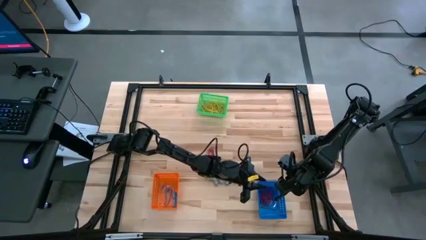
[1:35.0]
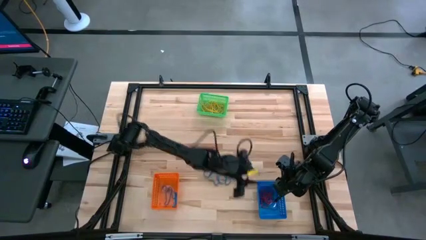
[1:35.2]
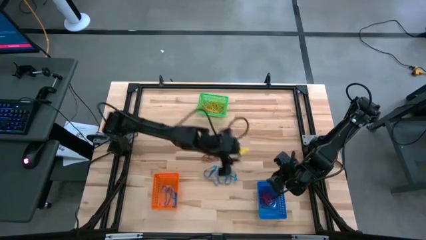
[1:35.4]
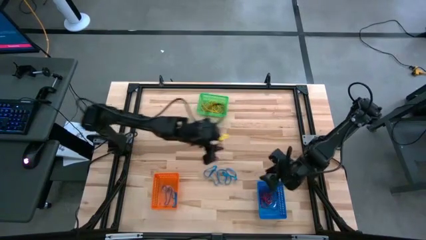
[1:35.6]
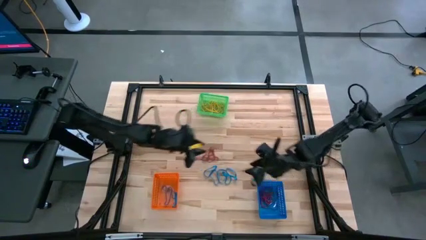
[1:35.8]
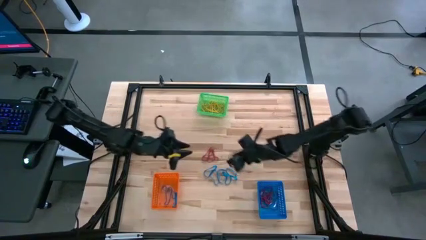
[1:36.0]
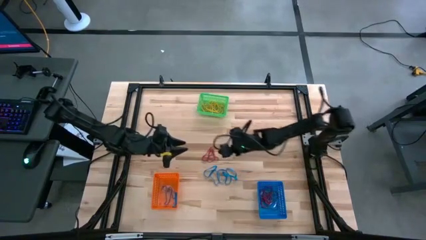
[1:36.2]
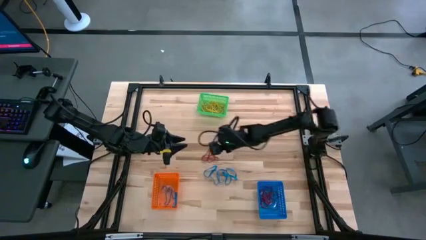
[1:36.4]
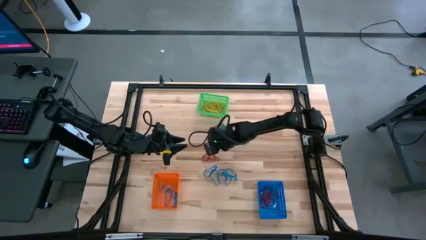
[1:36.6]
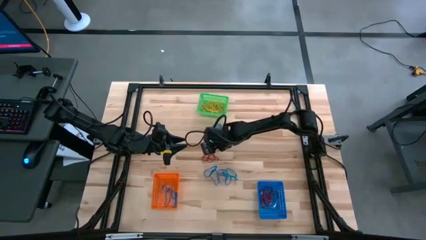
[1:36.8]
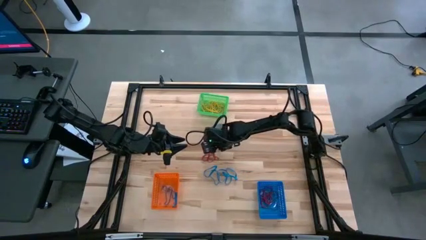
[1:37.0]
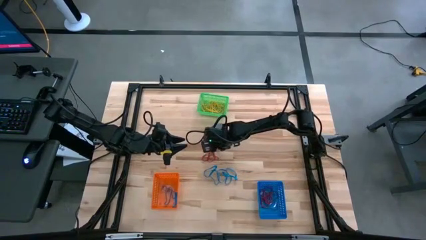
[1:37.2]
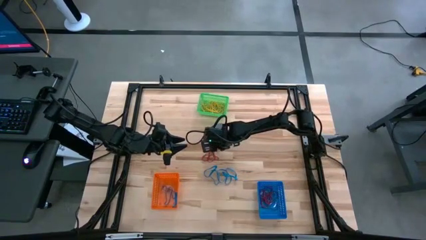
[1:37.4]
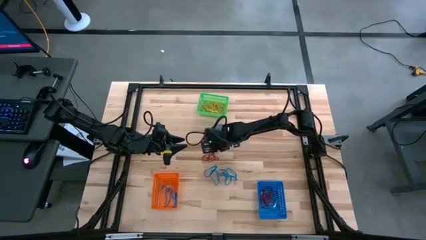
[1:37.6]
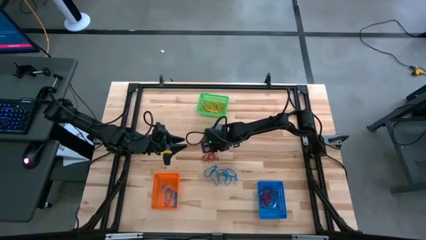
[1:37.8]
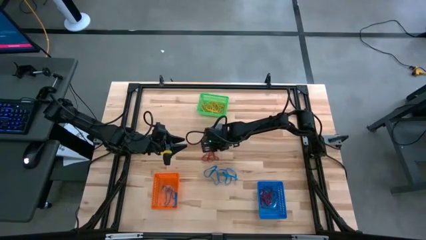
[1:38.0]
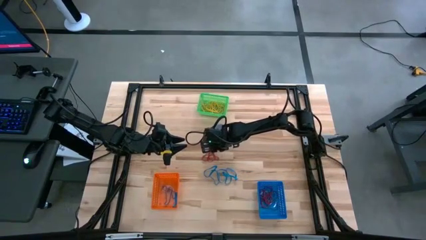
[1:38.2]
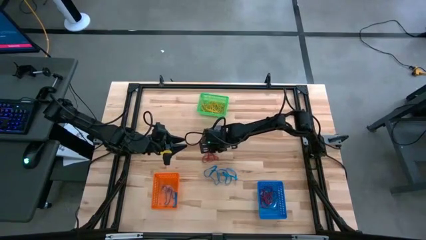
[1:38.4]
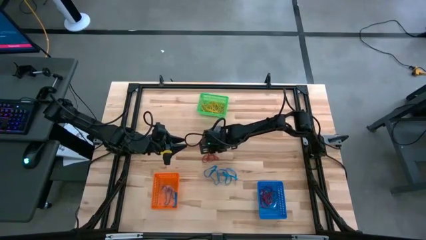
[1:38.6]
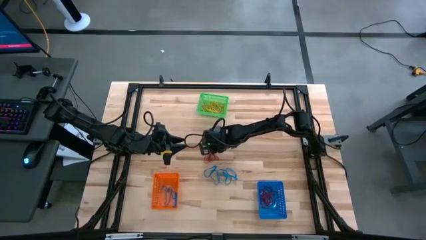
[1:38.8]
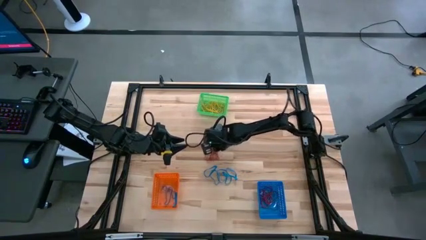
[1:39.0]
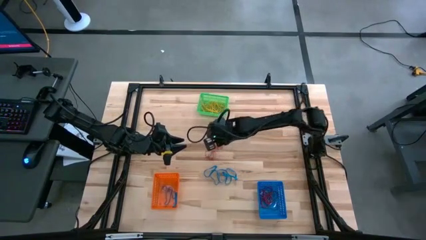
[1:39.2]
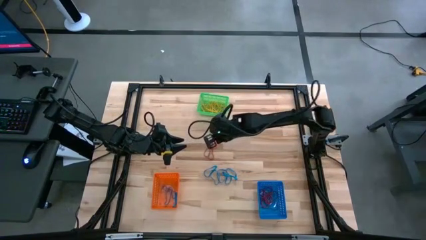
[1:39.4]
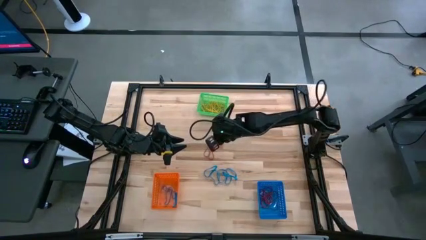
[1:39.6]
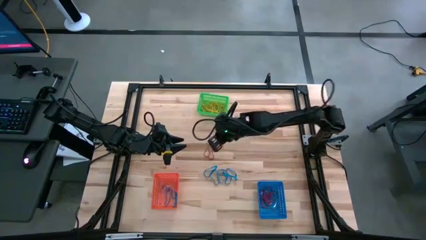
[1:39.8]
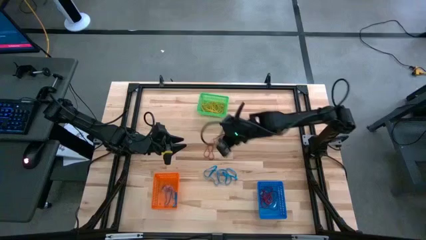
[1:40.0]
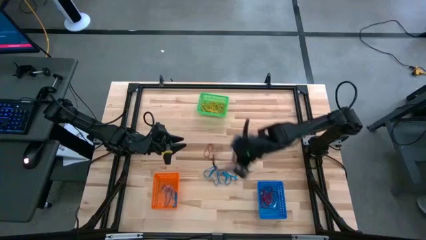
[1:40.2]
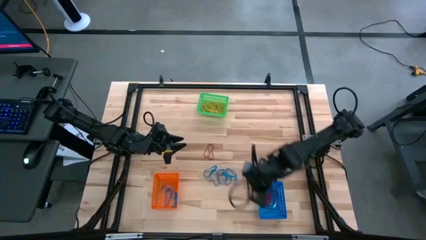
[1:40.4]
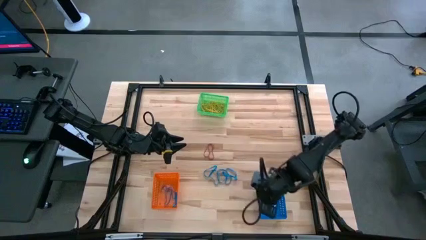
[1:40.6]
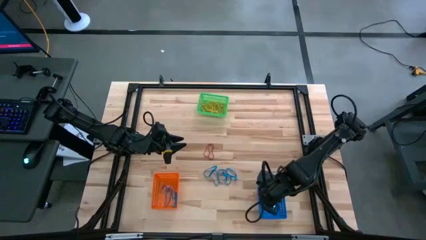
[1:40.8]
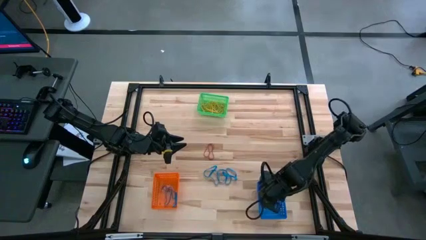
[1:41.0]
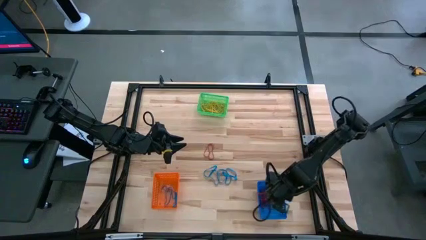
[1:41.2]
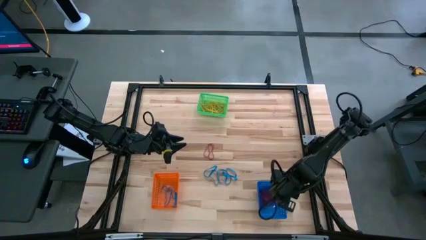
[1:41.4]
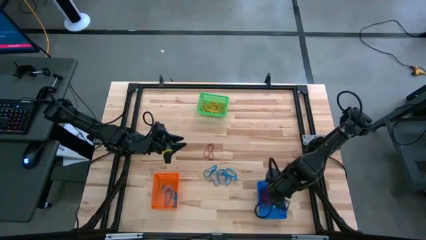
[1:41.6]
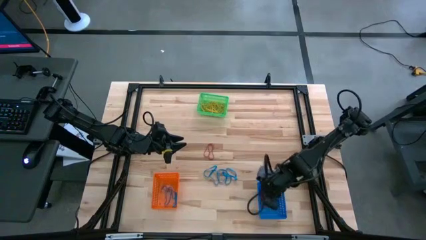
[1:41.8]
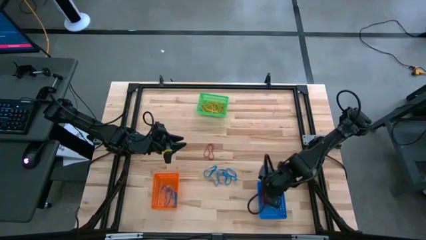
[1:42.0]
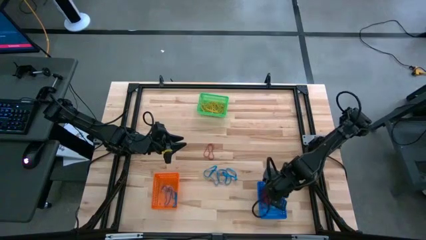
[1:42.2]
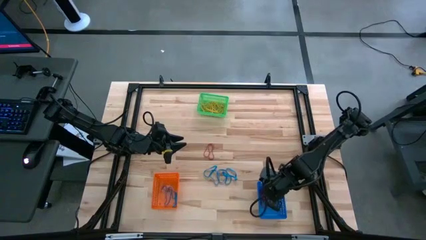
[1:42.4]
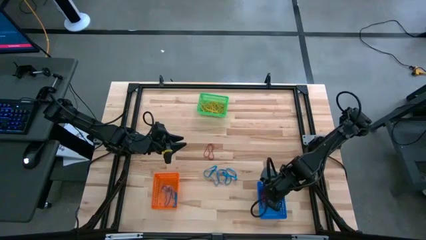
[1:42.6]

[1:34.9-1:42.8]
Task: Sort rubber bands into baskets
Put the red rubber band into the blue bin

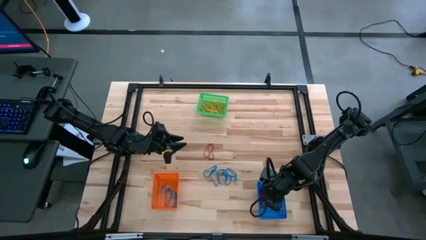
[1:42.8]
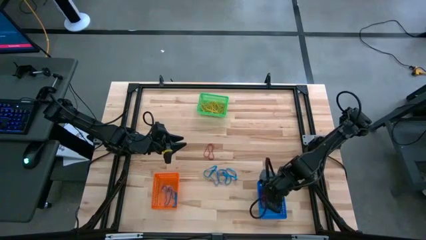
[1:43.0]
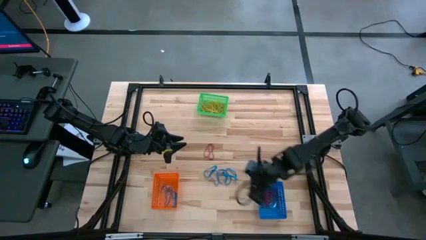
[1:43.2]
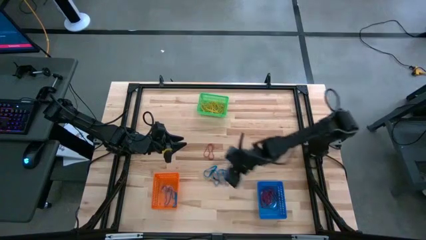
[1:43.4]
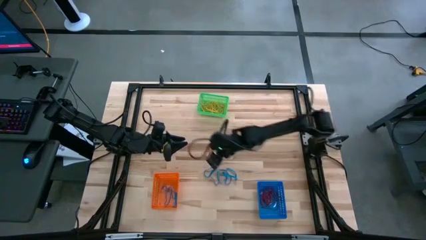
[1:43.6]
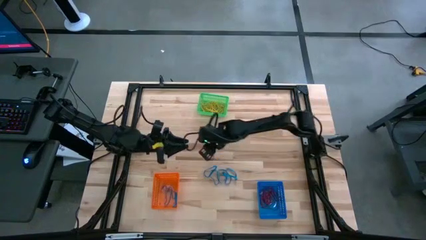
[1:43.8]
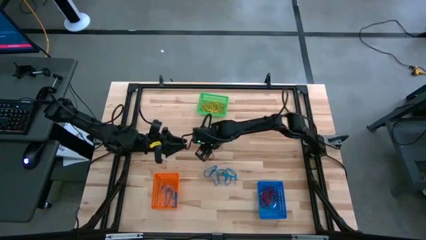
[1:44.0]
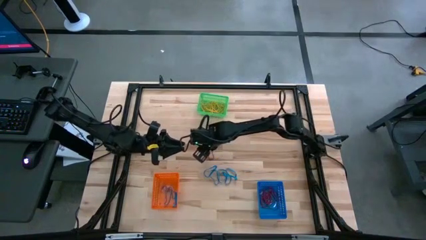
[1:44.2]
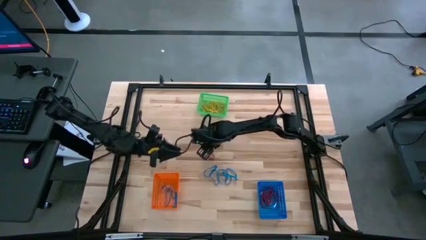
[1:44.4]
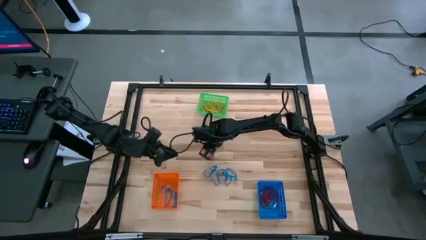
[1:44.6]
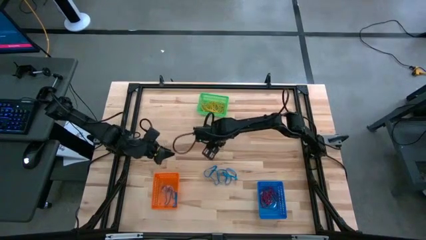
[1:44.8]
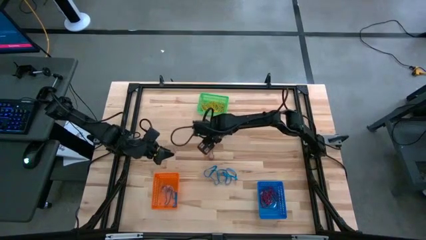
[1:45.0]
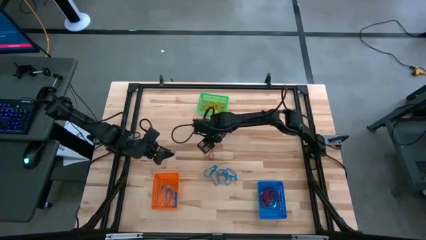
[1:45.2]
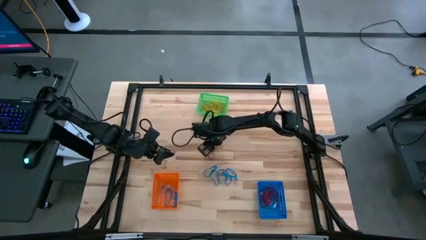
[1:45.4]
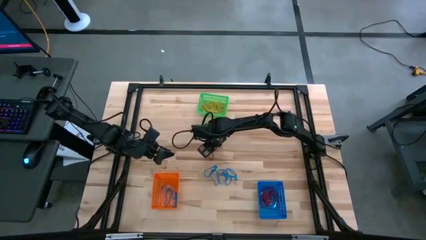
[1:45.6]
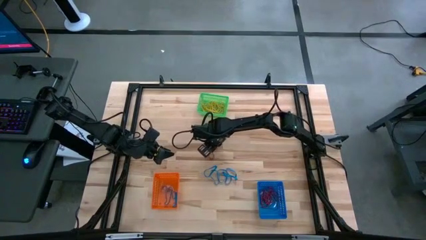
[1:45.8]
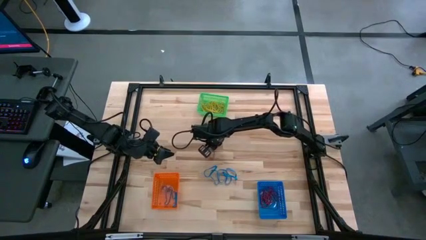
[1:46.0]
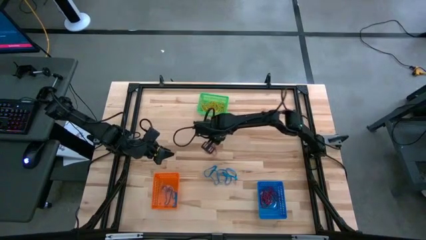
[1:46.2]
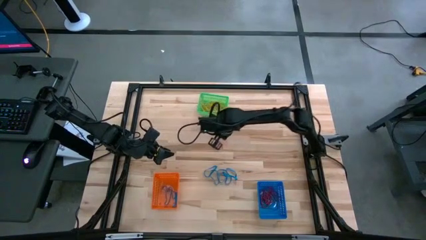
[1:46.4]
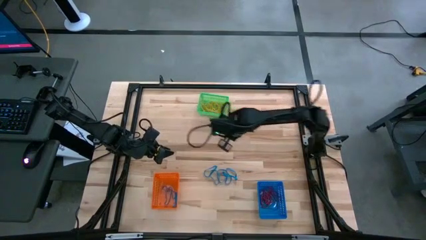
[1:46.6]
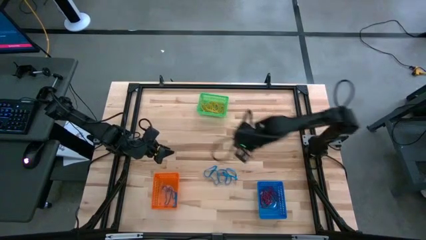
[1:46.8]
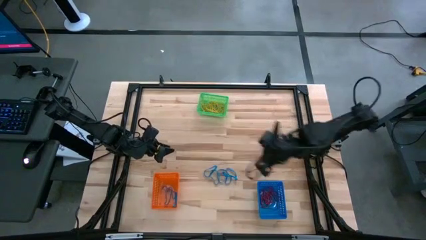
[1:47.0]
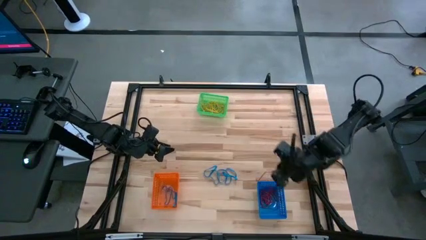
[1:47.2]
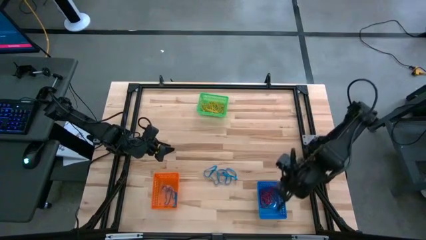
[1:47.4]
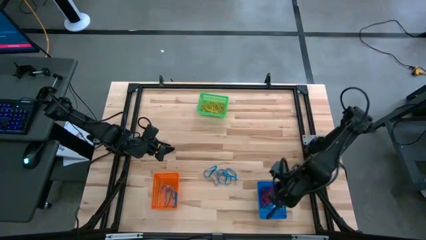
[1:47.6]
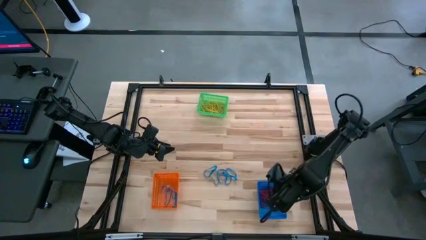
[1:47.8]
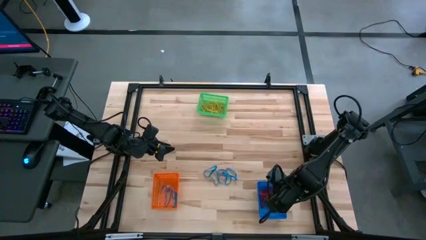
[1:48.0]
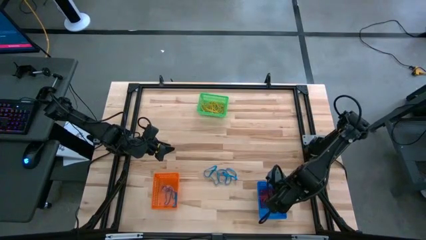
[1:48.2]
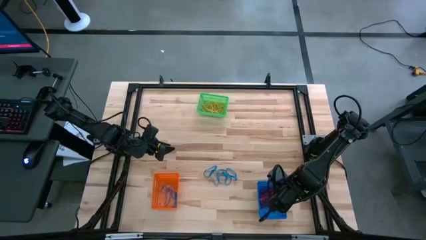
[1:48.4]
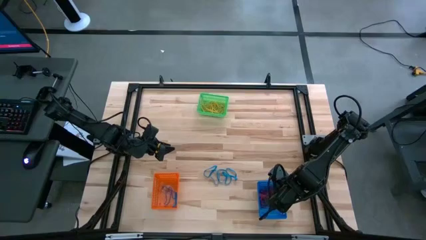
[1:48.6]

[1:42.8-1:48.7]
Put the red rubber band into the blue bin

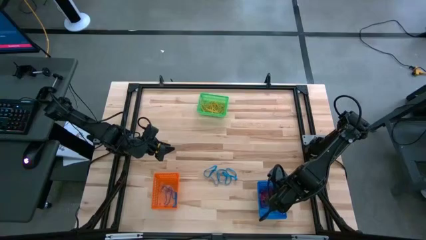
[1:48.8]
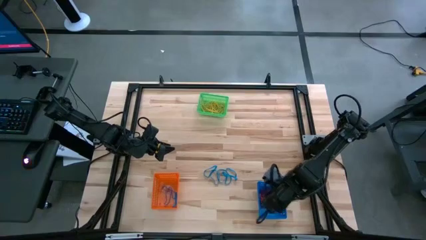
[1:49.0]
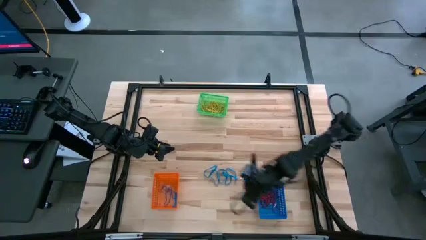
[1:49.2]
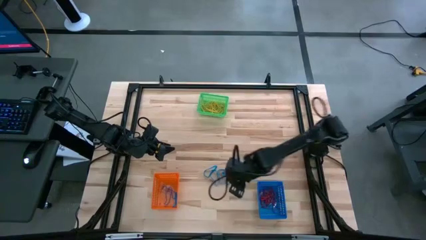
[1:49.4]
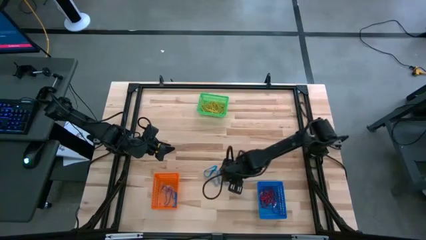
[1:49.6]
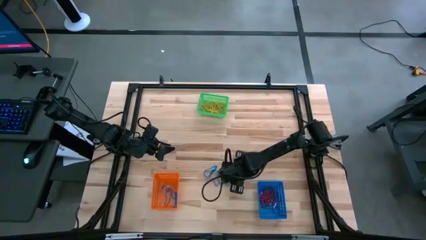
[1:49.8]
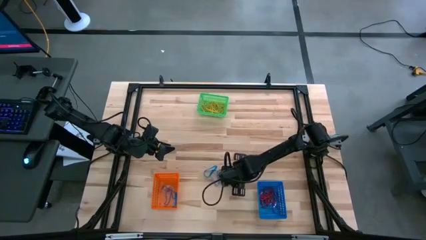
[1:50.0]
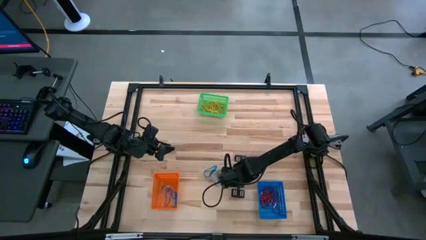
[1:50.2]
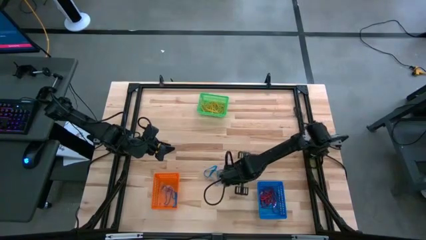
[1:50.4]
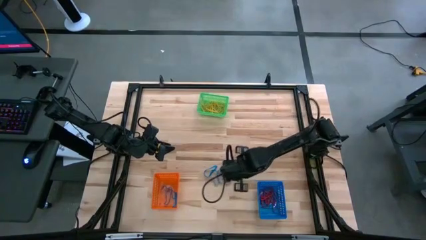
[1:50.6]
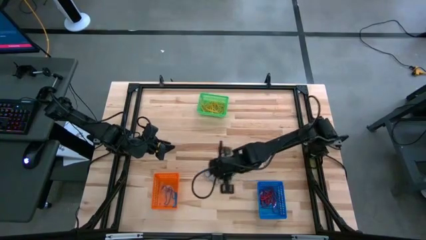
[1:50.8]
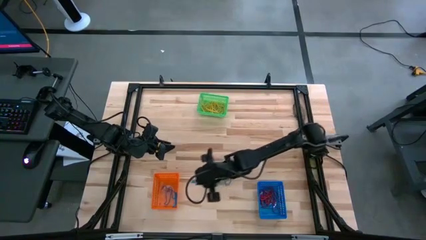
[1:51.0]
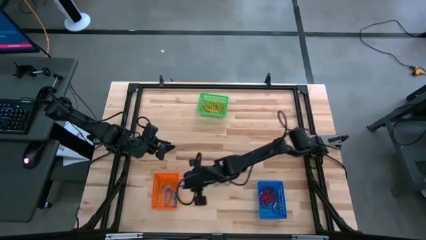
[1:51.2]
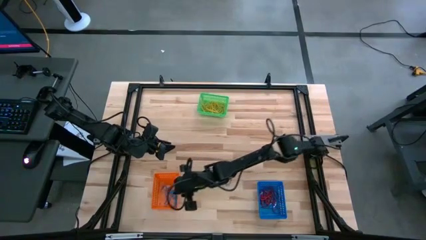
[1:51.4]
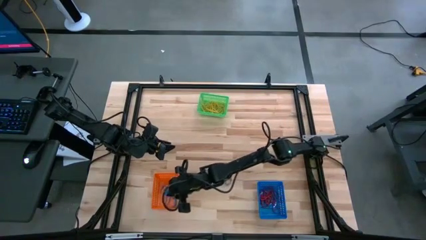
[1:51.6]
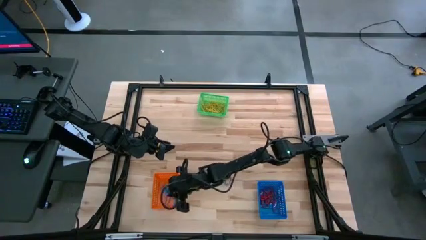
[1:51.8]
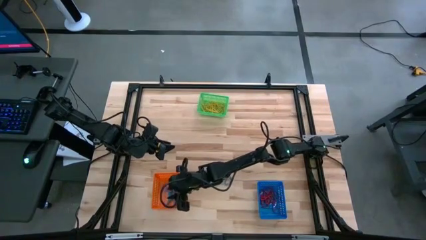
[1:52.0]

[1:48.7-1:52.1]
Put the blue rubber band into the orange bin
